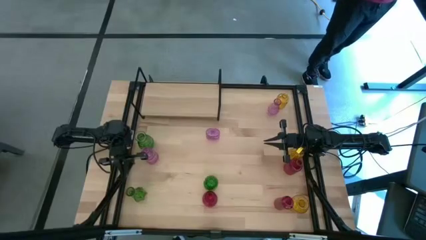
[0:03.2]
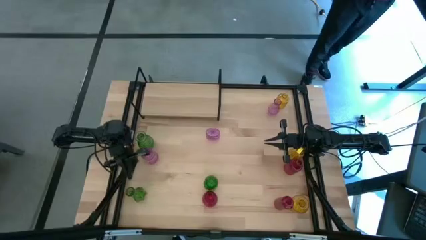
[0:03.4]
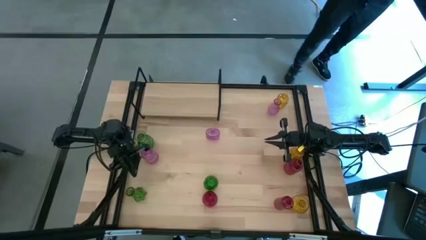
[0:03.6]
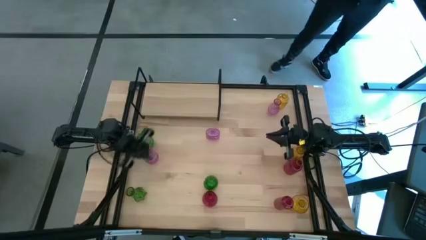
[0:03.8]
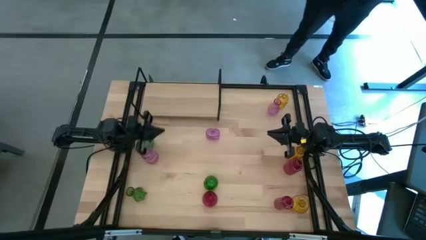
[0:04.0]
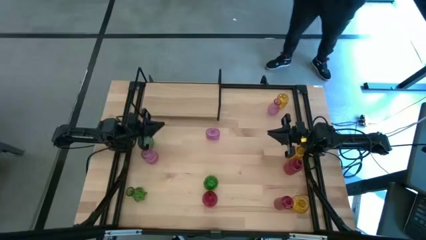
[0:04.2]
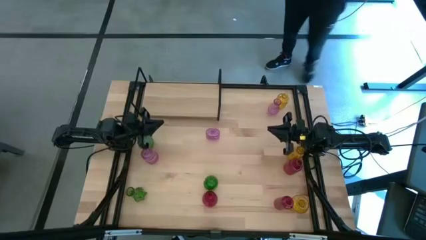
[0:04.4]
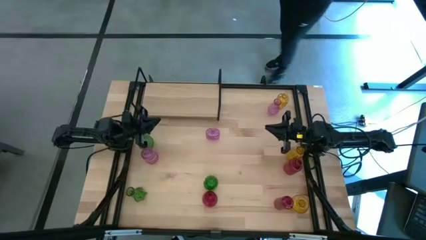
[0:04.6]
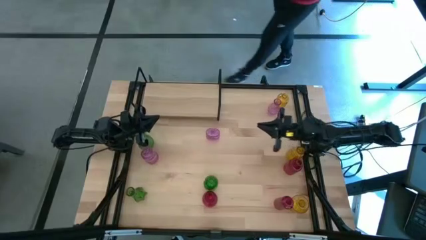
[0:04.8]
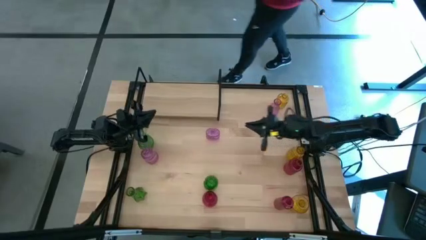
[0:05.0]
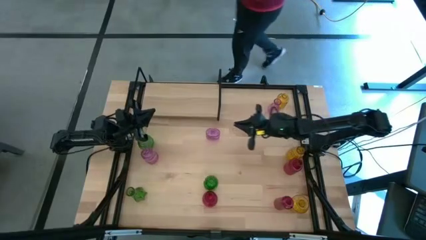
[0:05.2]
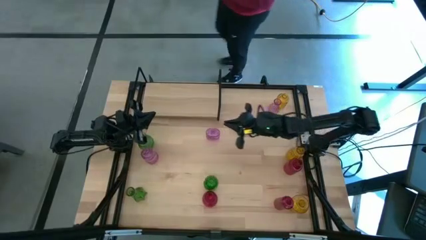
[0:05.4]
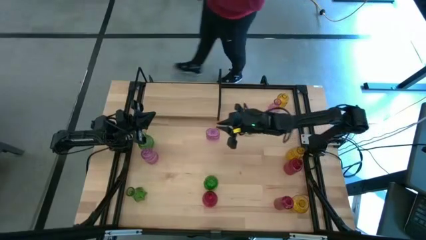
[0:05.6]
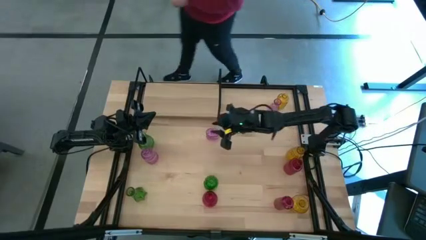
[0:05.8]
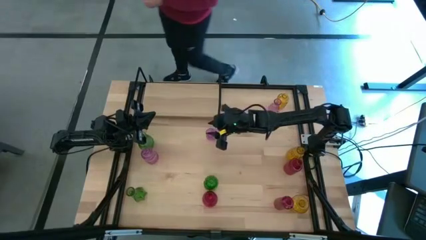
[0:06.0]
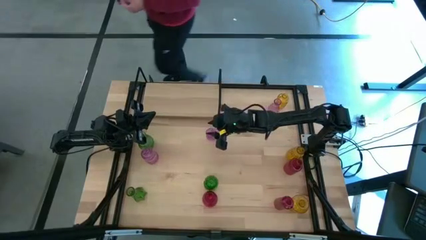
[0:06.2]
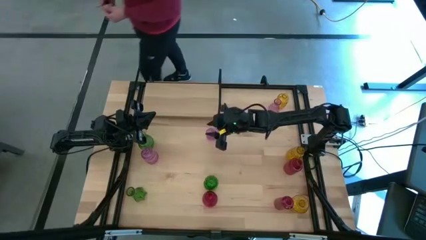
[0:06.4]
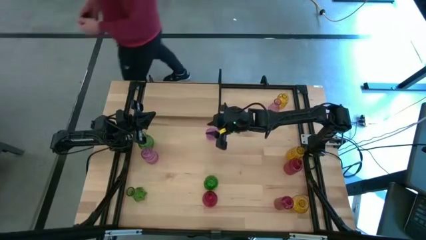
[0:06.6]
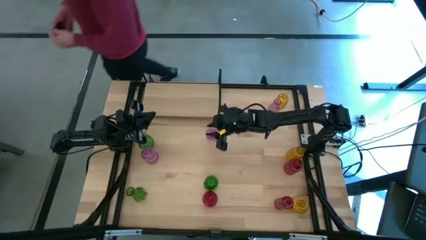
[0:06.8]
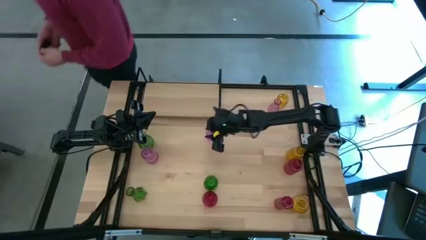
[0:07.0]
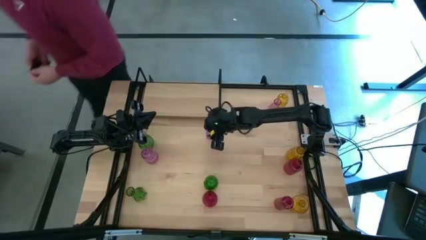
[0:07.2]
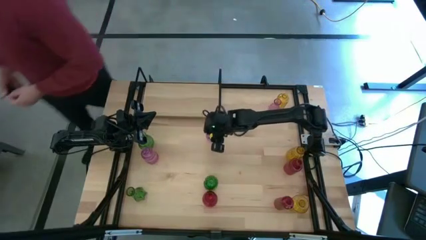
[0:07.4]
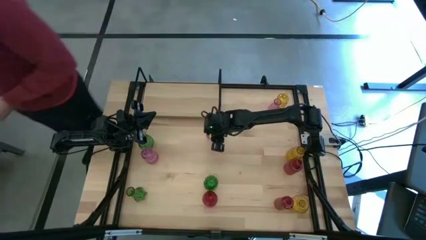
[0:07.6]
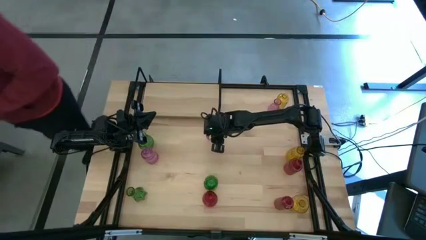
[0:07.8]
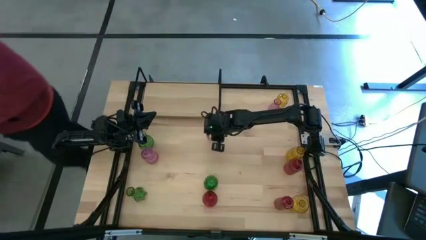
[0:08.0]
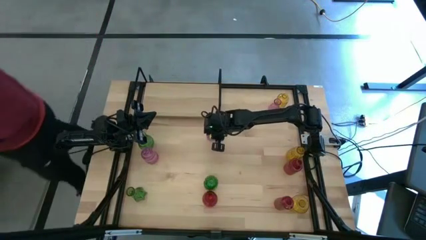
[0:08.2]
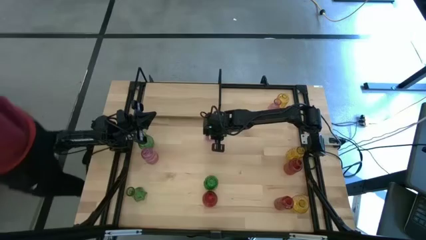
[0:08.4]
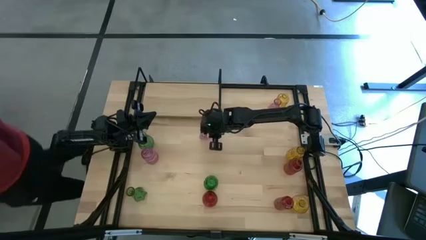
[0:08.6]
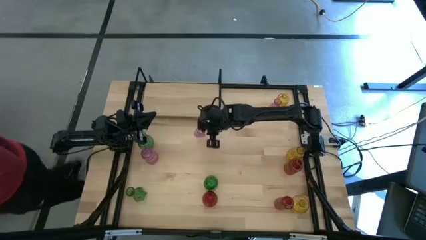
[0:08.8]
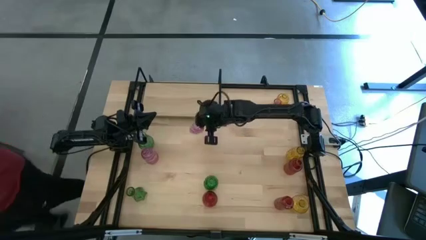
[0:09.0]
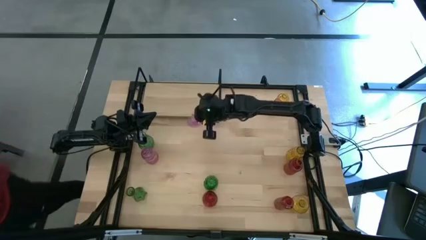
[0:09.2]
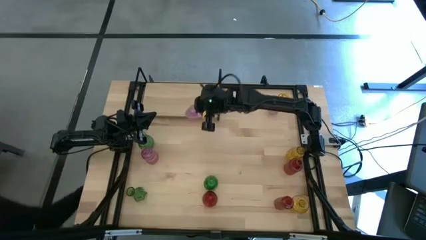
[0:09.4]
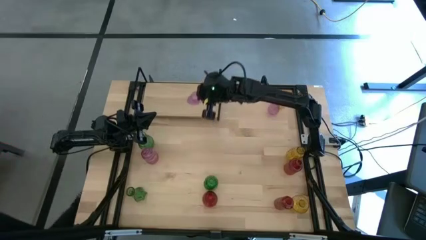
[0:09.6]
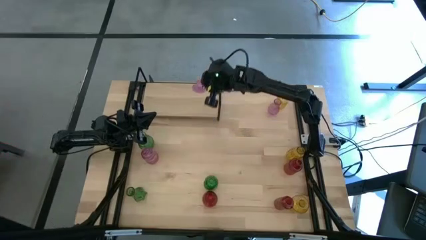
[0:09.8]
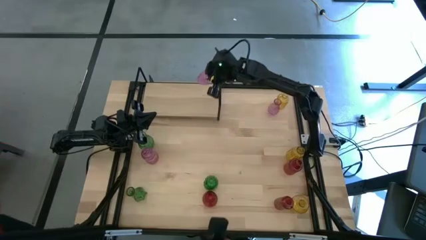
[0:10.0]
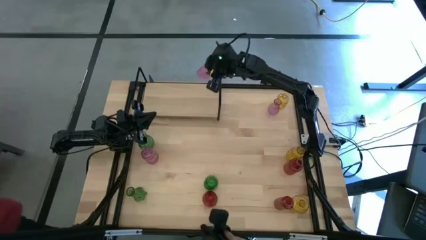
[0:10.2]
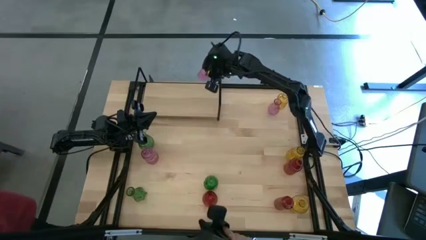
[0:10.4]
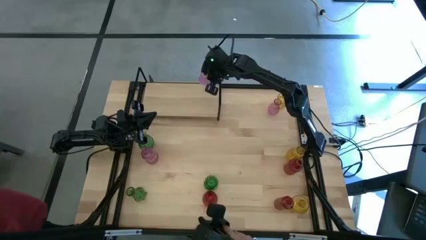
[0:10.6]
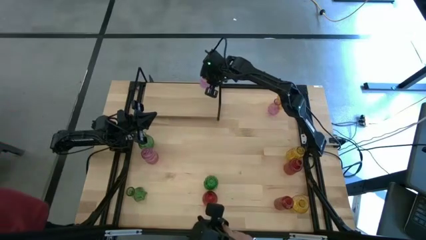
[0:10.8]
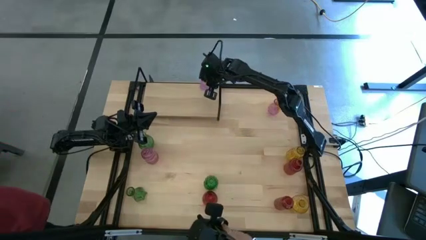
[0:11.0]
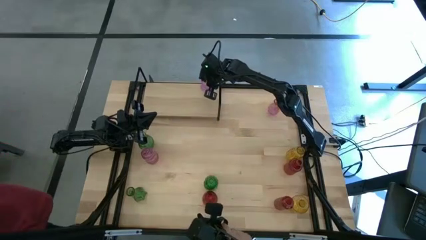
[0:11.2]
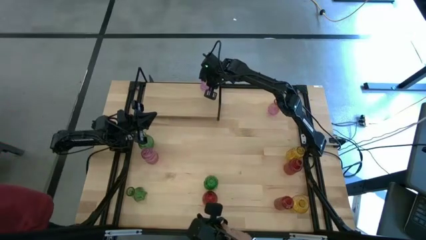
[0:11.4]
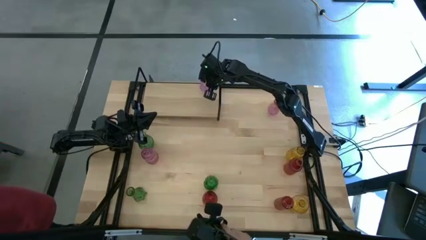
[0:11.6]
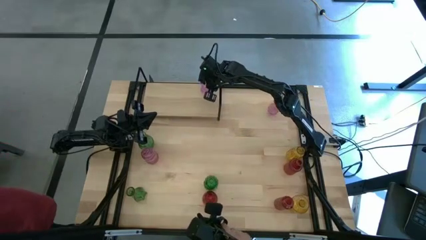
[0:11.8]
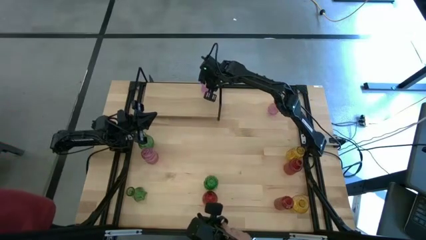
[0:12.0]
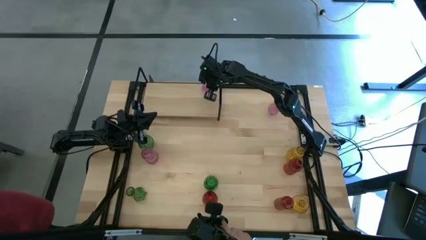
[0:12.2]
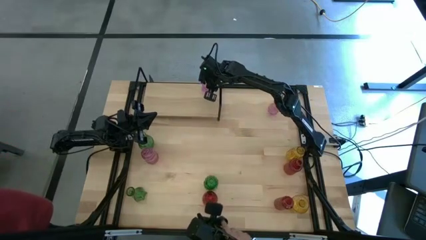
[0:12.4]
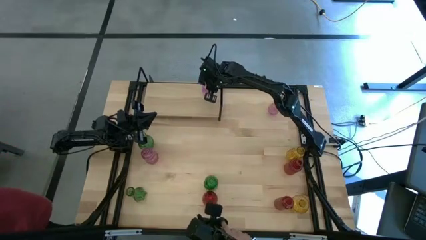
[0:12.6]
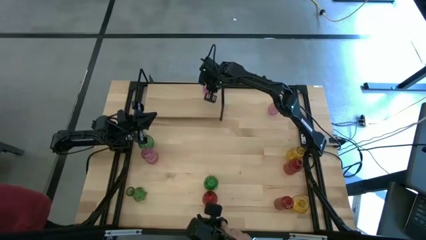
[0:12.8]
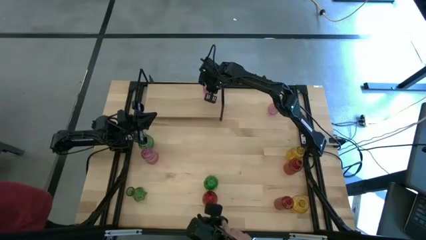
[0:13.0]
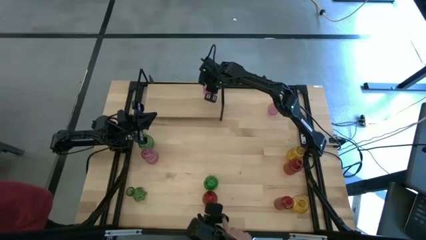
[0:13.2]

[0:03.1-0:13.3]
Task: sort vases onto shelf
Put the middle violet vase on the shelf

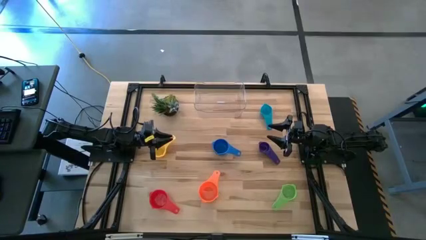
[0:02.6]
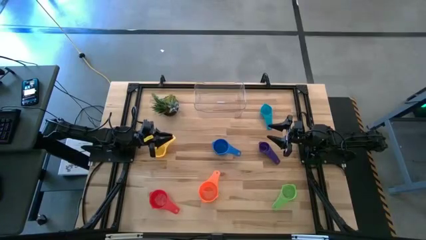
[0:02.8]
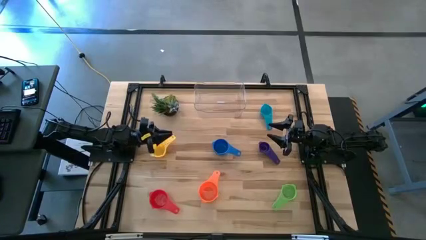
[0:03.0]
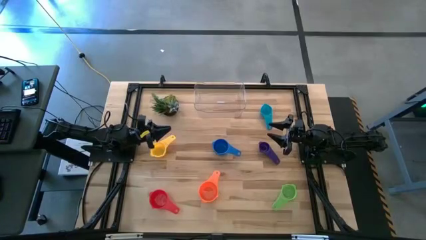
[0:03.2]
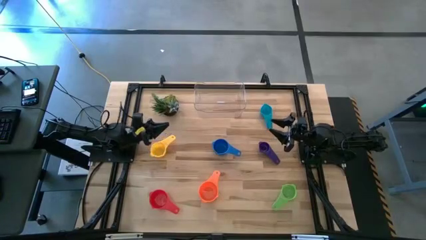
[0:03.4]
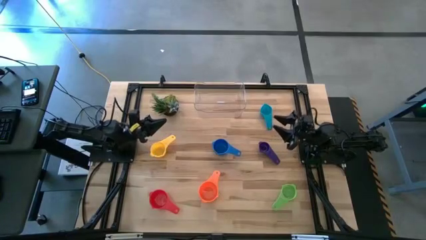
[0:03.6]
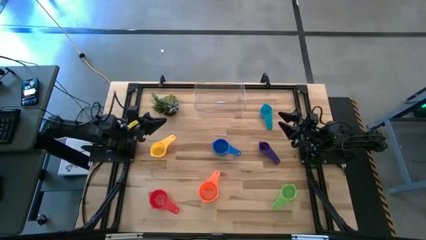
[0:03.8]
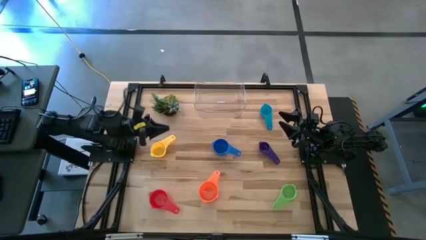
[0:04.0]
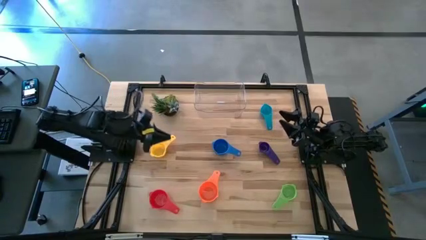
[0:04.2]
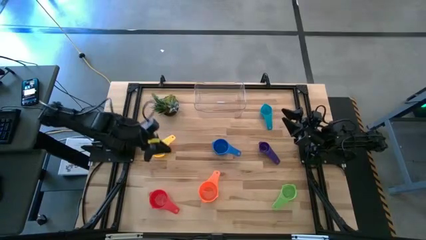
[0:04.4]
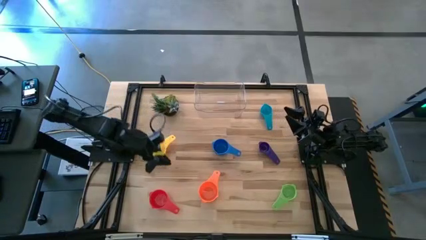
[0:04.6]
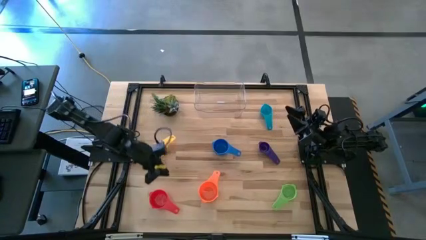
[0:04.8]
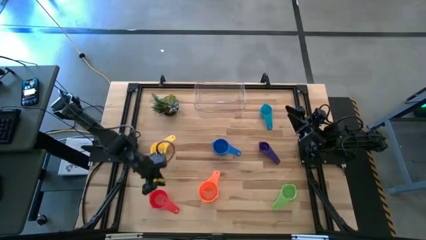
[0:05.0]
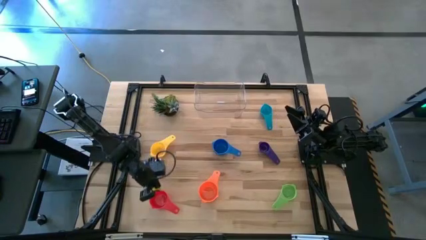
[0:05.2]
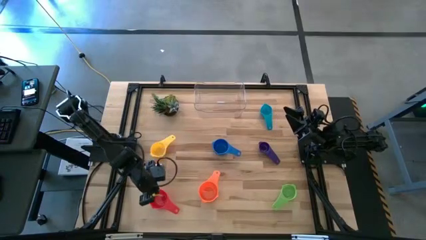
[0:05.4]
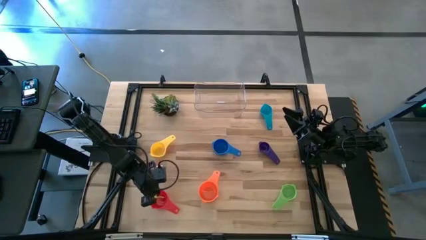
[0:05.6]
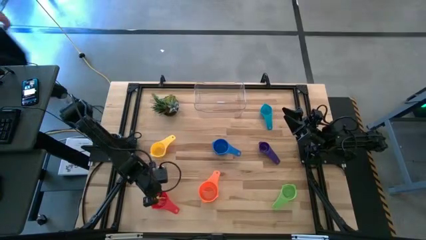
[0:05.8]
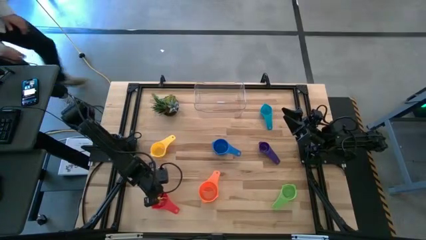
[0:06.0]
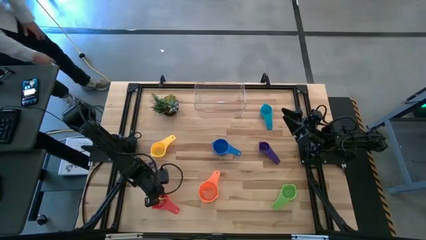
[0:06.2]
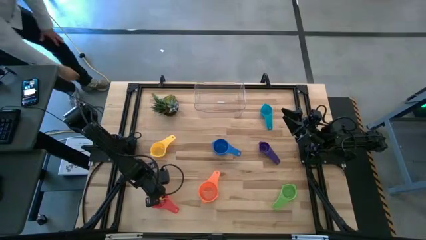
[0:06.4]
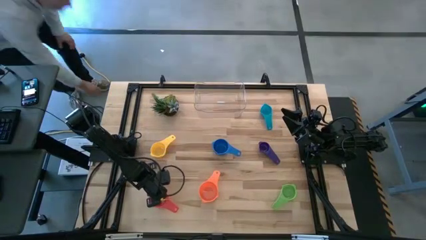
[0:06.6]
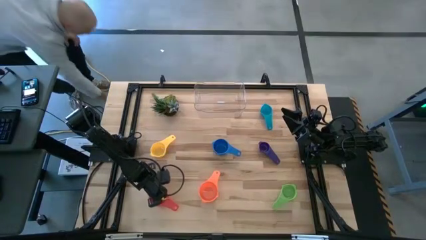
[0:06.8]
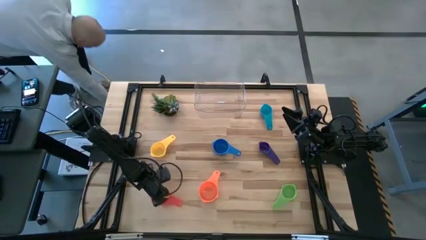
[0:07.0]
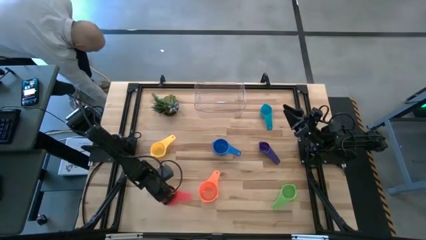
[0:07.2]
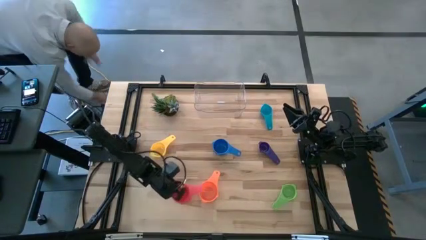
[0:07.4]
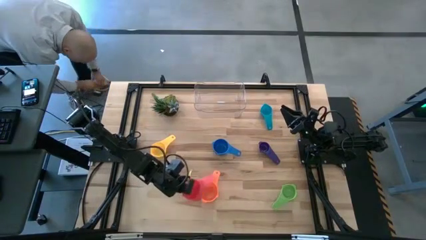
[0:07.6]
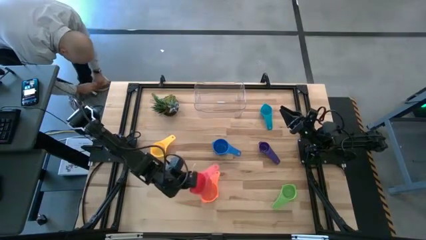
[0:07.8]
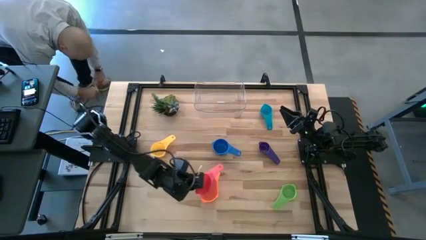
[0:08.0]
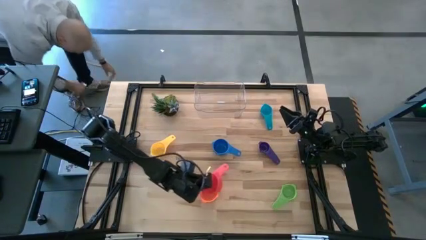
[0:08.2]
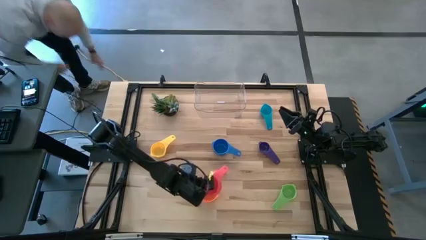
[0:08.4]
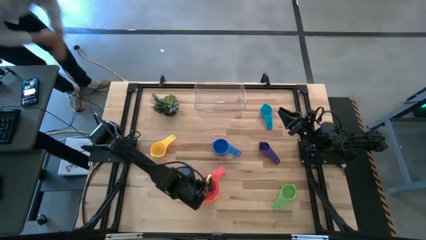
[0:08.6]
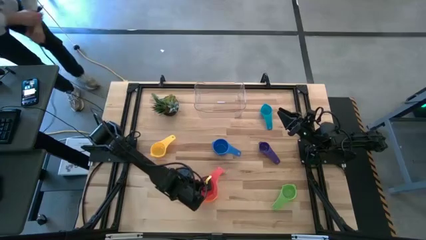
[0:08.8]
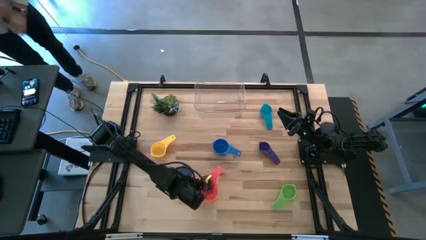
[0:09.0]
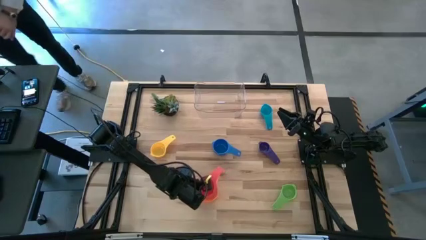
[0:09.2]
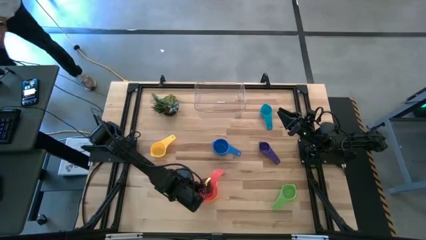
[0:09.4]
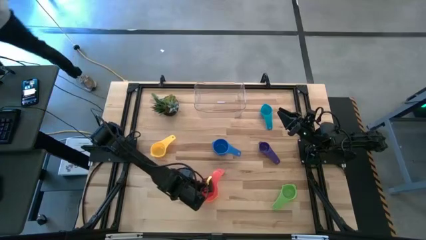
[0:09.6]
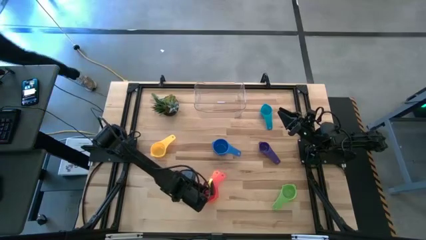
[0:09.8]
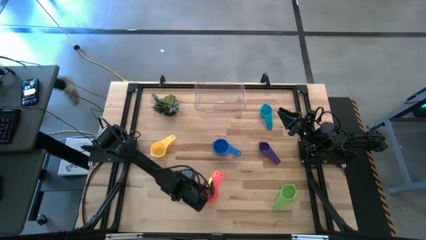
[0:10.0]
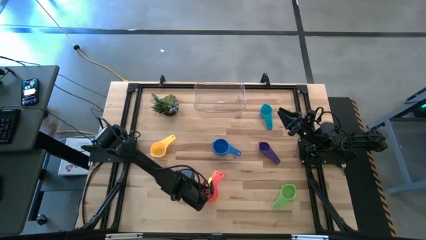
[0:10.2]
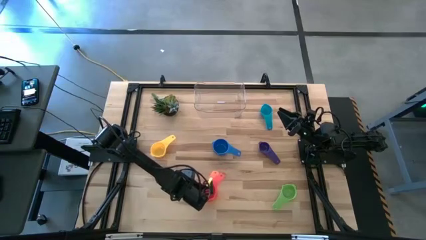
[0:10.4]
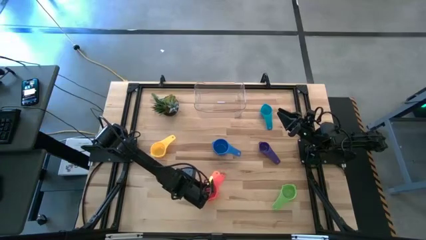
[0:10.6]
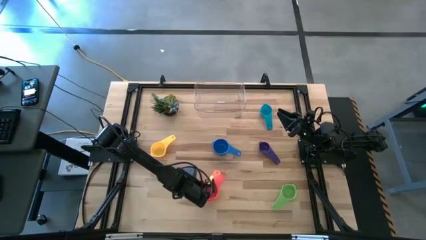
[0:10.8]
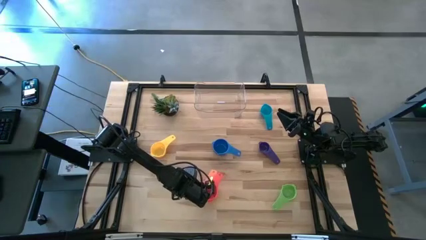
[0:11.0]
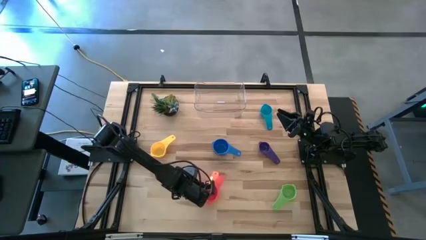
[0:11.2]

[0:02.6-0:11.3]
Task: Nest measuring cups in basket
Stack the red measuring cup on the orange measuring cup
